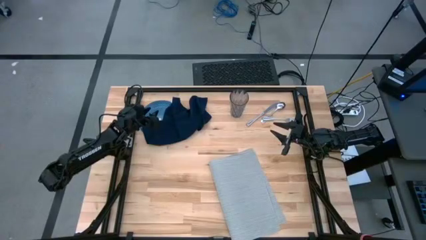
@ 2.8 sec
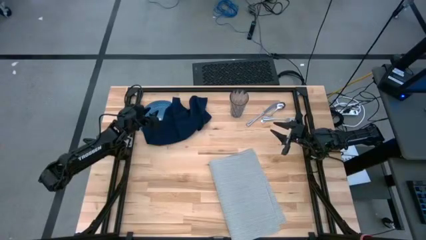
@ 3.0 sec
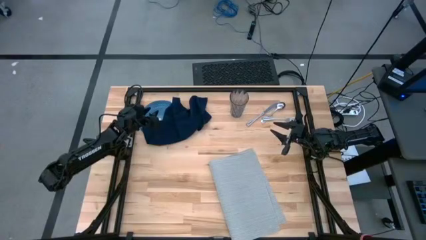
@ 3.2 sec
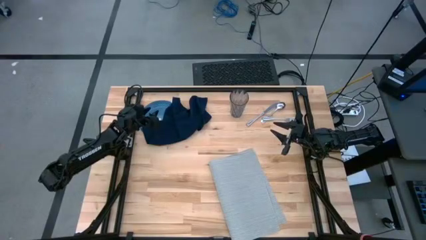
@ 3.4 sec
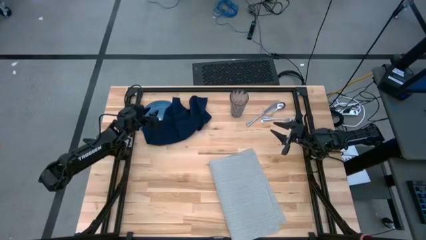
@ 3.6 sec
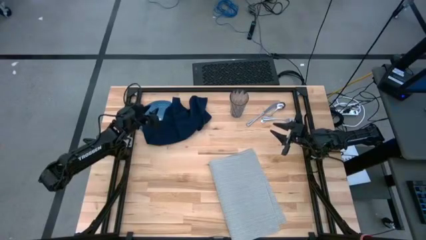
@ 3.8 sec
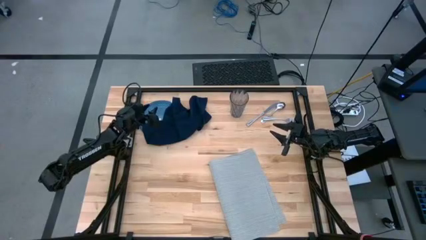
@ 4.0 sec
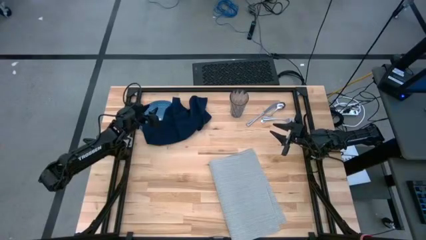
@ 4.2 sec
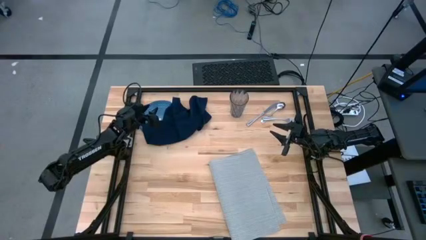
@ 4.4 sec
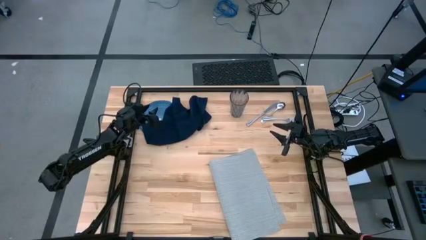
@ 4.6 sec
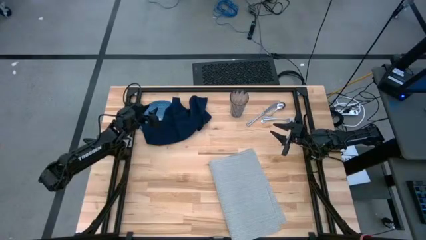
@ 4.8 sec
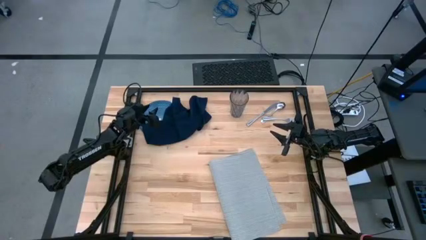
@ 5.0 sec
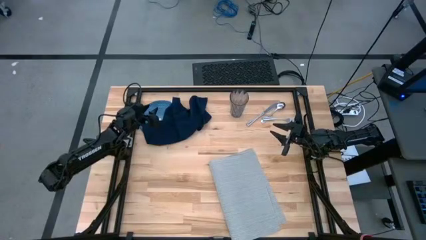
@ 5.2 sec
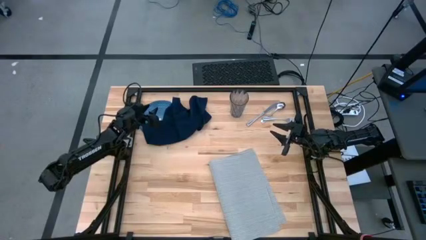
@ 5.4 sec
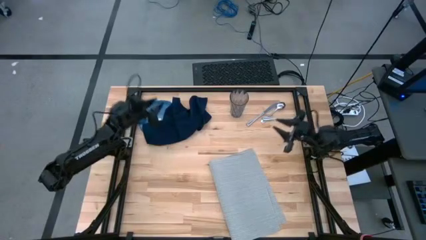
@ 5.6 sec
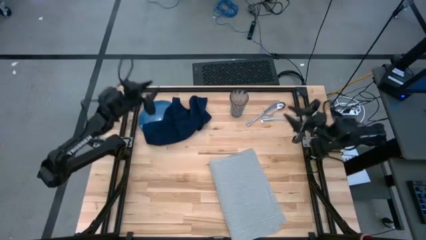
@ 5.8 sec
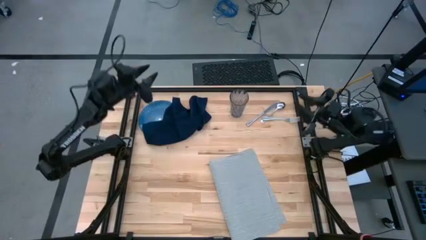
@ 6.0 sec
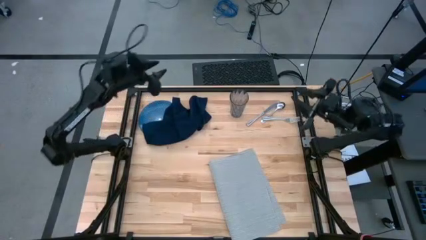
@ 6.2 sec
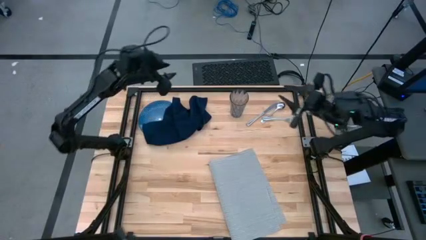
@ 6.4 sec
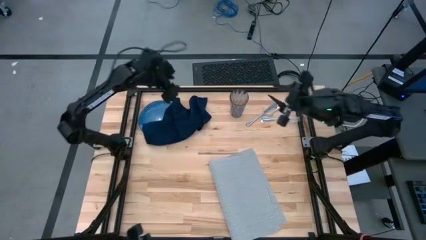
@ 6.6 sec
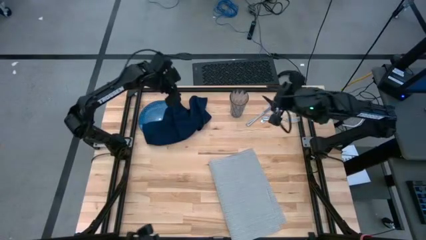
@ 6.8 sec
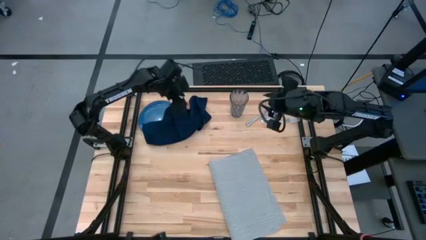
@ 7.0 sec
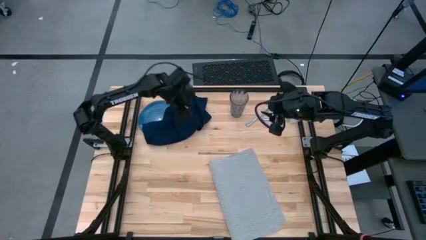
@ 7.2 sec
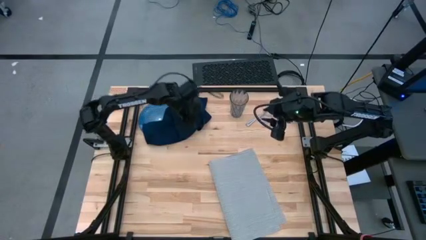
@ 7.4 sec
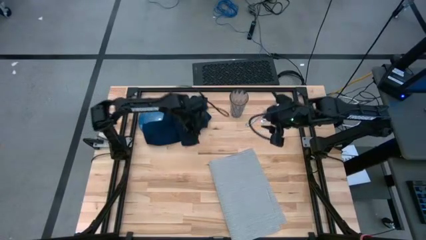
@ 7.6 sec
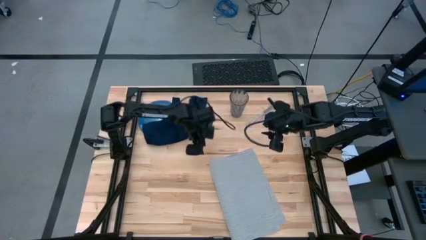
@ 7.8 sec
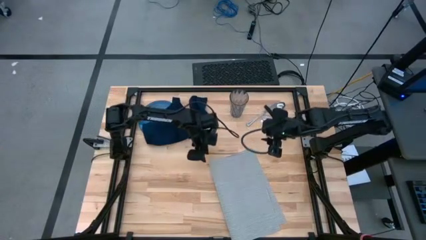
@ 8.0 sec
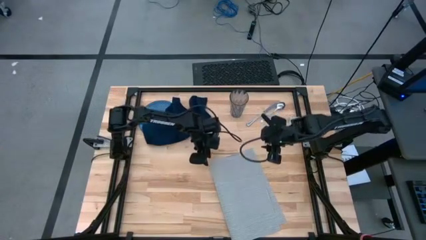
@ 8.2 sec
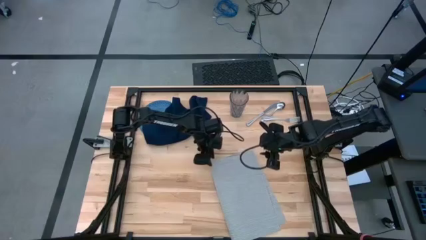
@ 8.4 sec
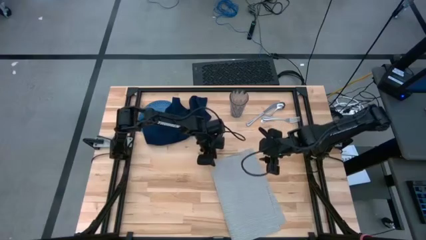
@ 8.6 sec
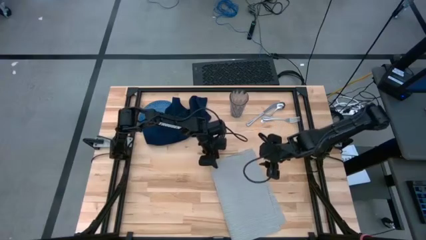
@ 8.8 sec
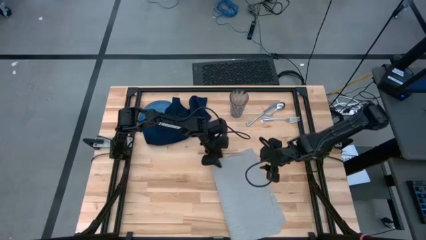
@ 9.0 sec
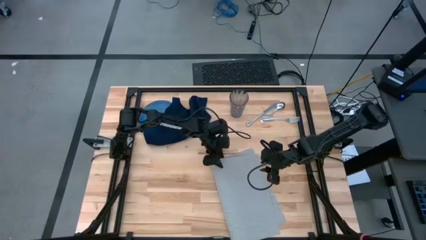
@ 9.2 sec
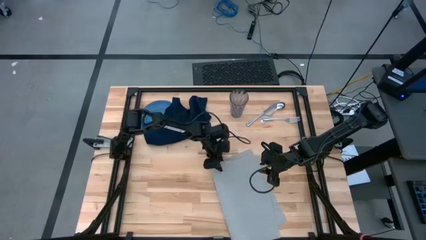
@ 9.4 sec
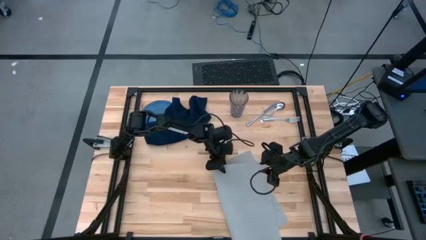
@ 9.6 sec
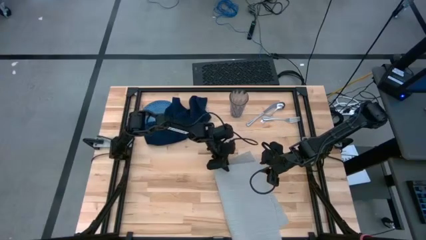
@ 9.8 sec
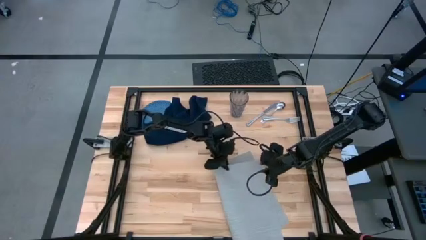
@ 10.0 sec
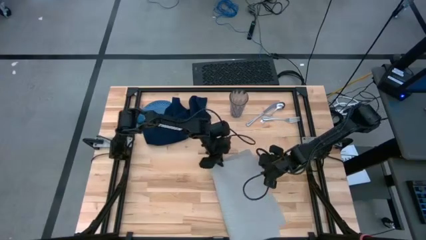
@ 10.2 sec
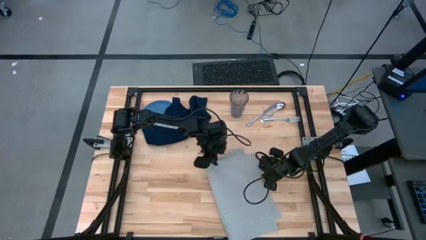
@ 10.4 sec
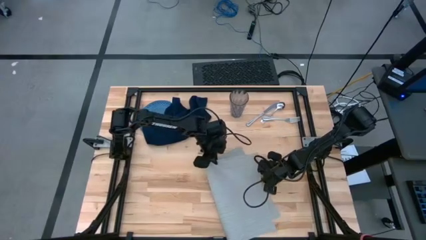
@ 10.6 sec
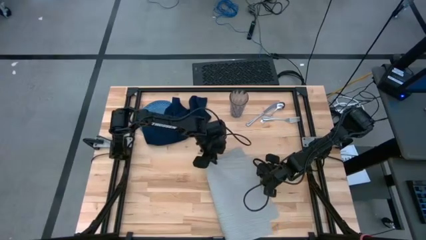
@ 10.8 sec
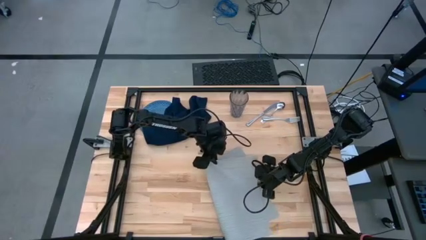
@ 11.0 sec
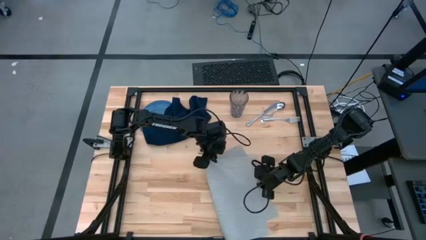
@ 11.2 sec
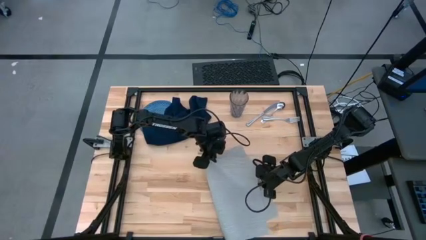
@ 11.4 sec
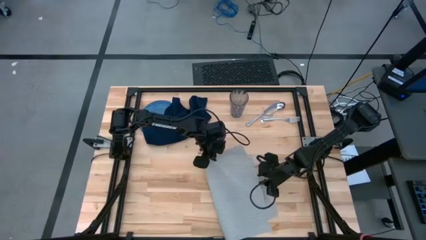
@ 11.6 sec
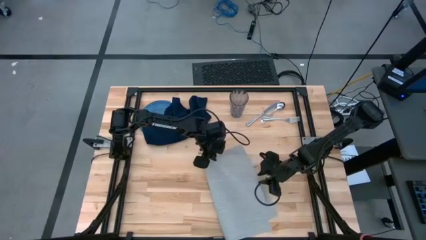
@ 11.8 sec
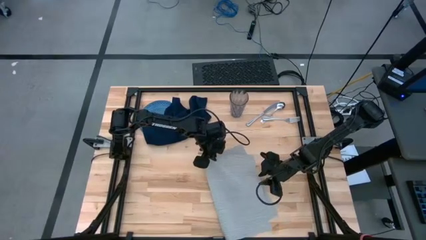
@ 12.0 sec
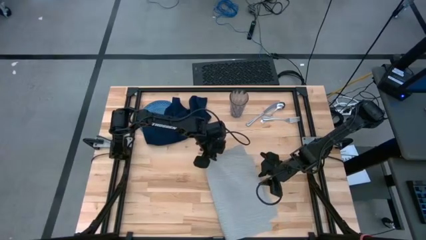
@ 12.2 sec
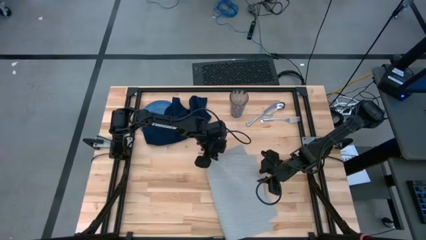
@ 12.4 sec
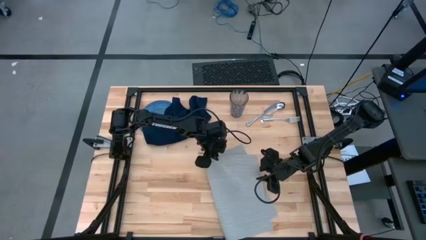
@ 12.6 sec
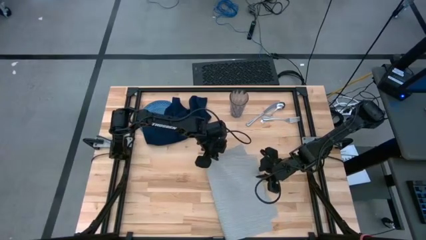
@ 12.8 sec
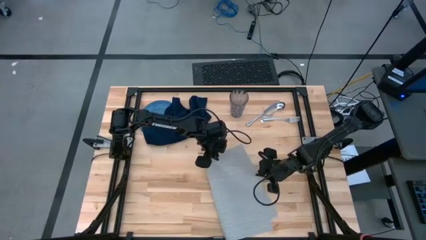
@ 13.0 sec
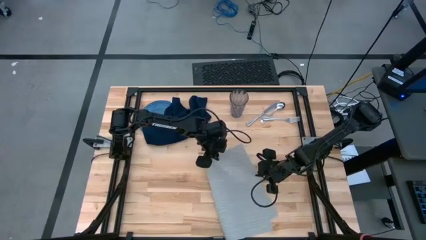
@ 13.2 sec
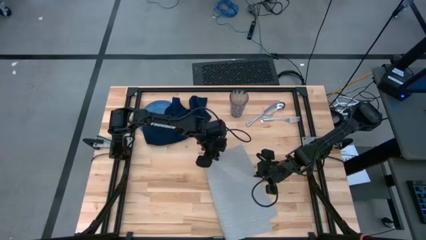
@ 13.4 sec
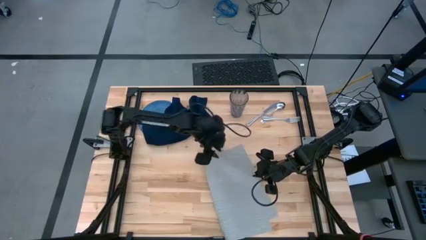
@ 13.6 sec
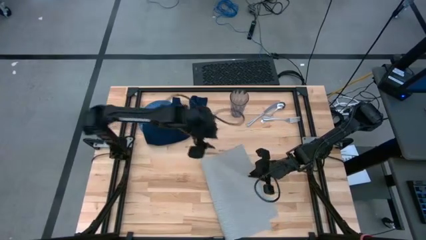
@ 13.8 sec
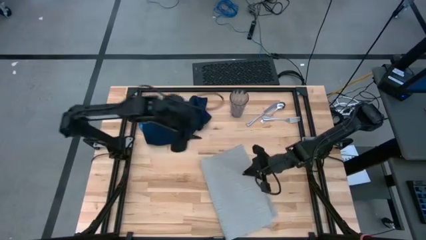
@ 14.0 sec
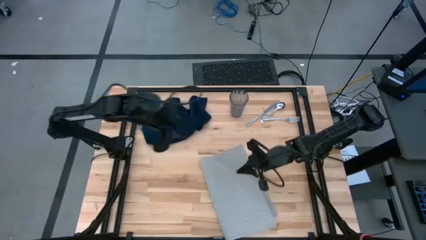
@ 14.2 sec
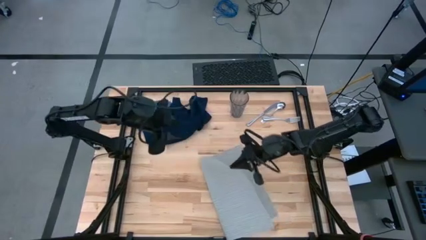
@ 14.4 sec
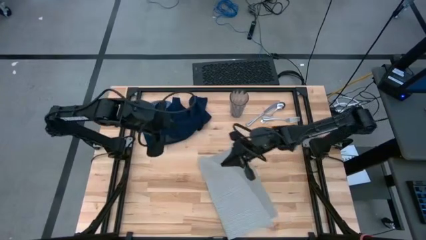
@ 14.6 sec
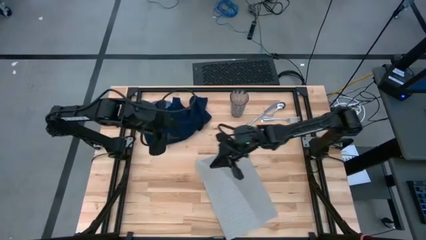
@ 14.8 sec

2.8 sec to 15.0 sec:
Task: Set table place
Prepare the gray placemat

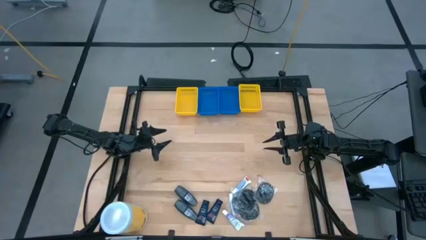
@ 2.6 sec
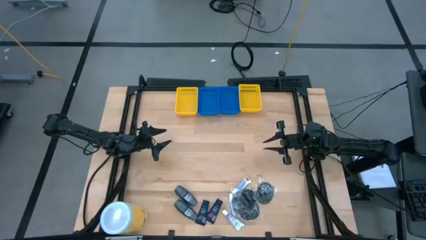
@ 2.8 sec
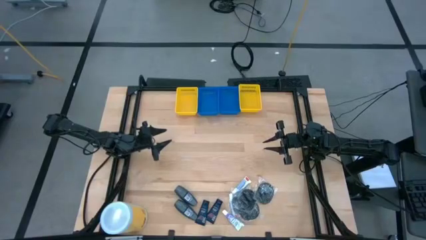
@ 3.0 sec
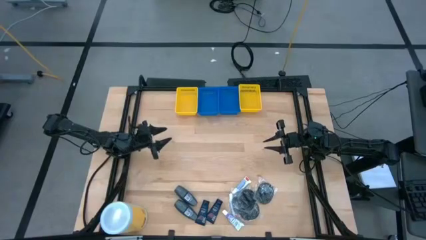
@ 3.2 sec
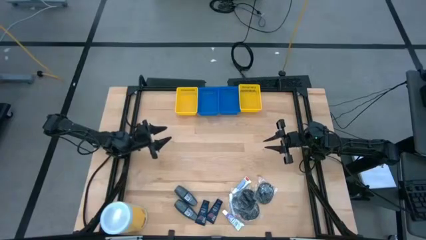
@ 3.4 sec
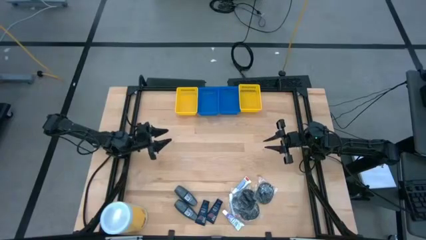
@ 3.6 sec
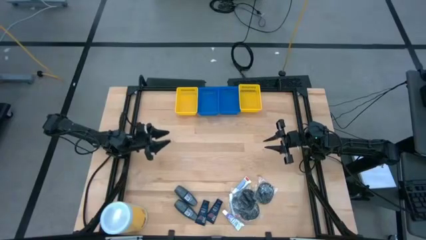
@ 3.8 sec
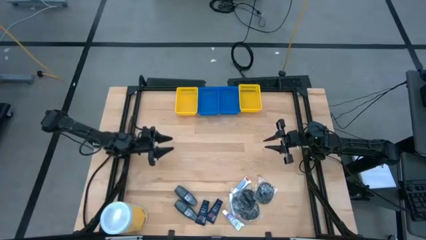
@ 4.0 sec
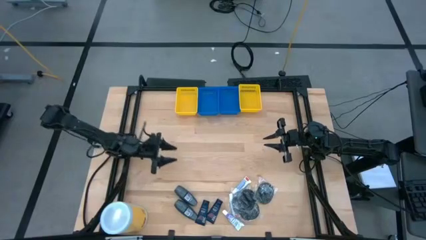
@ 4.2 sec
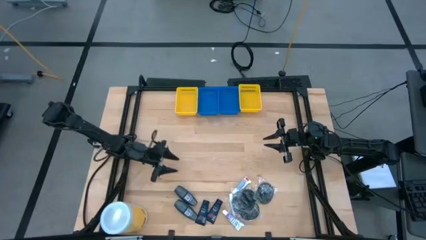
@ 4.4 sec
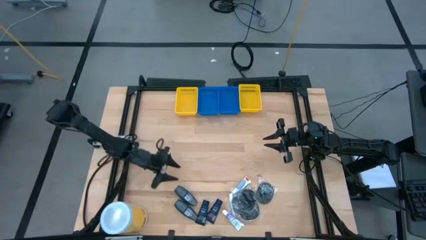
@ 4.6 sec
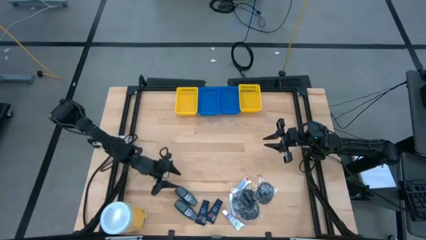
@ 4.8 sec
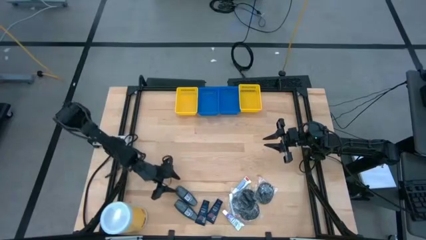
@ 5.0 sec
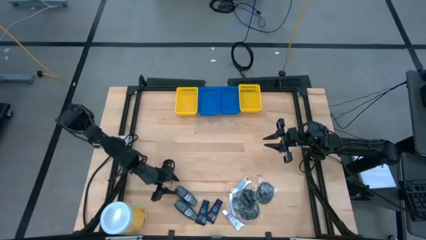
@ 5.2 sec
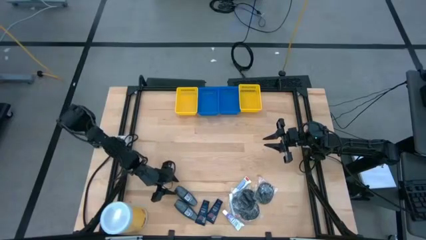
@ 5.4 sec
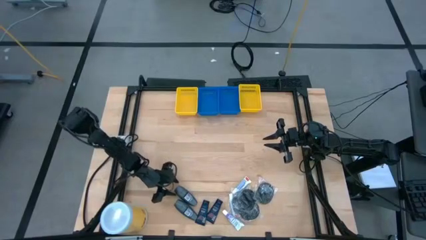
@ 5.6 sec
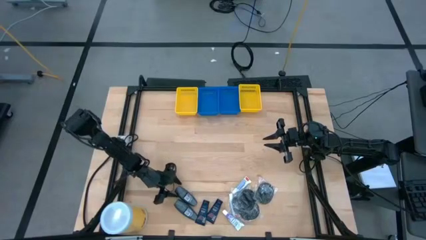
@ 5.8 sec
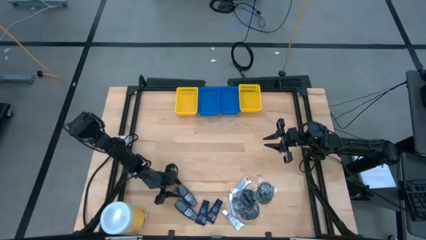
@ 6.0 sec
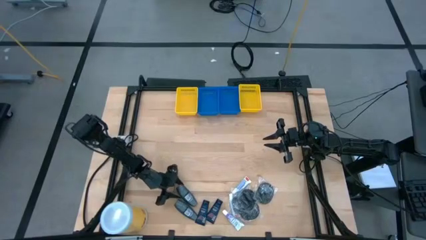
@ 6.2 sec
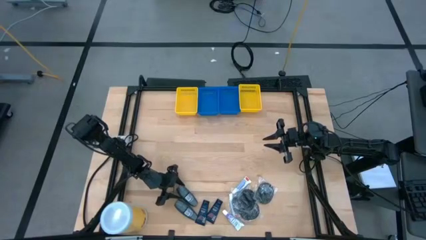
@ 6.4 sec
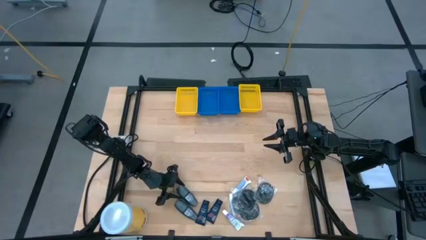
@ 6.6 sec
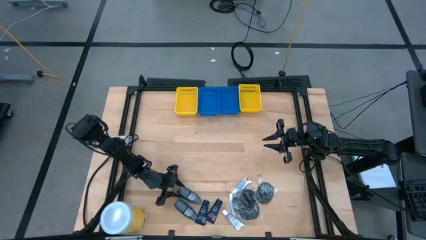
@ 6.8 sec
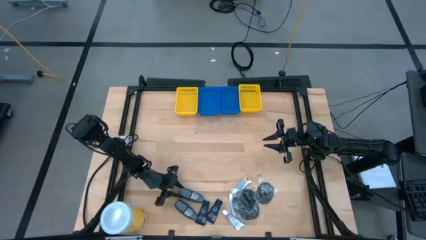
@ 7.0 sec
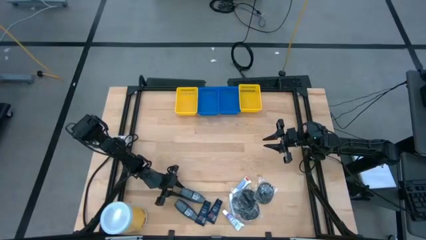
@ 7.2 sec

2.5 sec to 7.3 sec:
Task: Pick & Place Travel size toiletries
Put the top deodorant cream into the right blue bin
